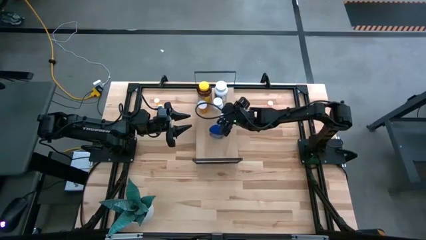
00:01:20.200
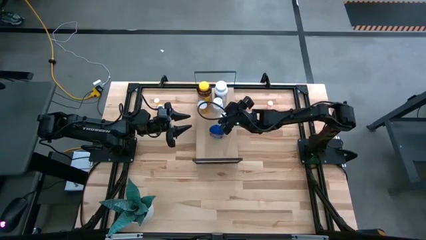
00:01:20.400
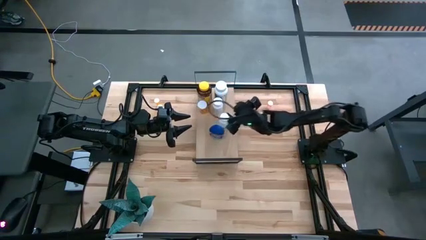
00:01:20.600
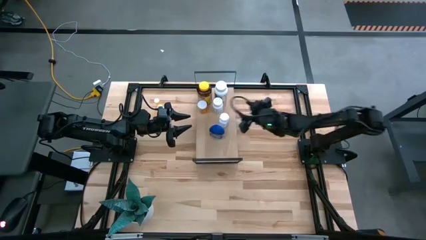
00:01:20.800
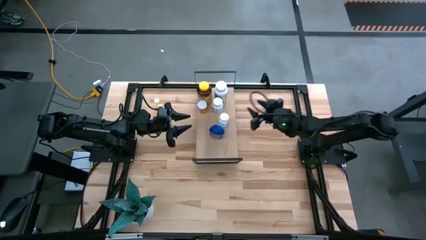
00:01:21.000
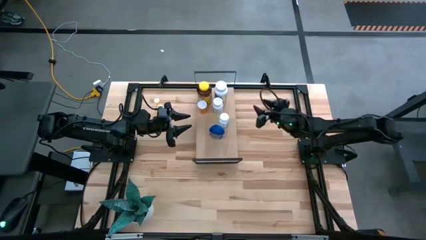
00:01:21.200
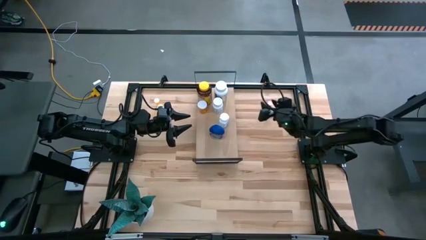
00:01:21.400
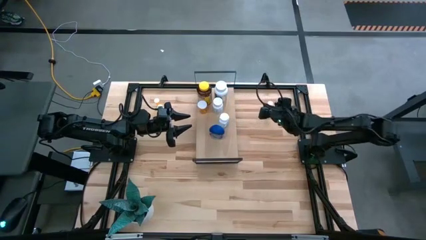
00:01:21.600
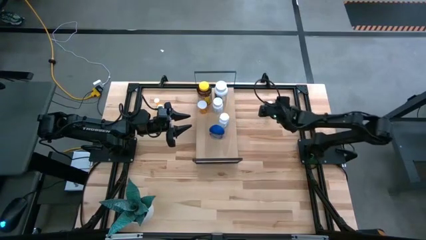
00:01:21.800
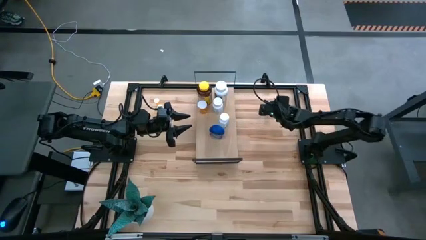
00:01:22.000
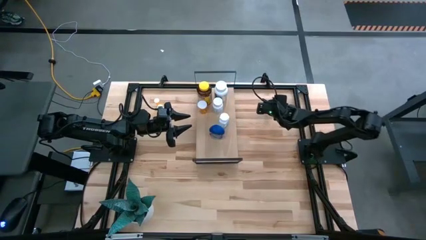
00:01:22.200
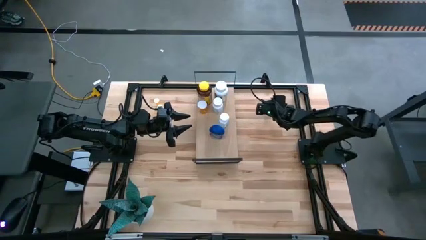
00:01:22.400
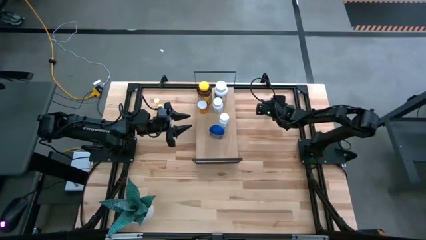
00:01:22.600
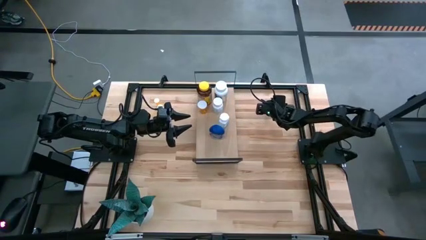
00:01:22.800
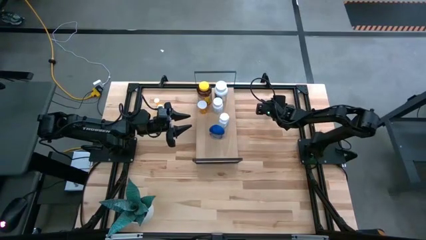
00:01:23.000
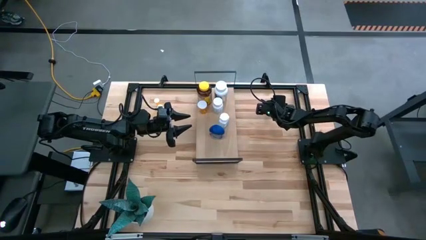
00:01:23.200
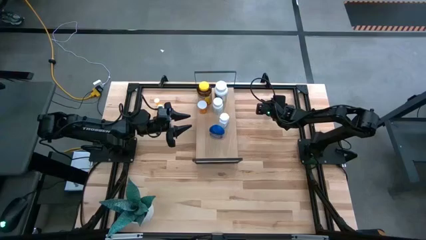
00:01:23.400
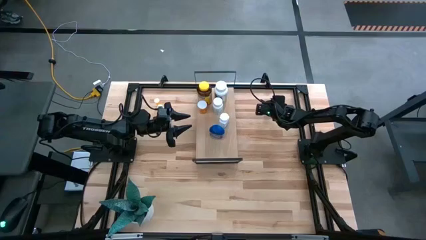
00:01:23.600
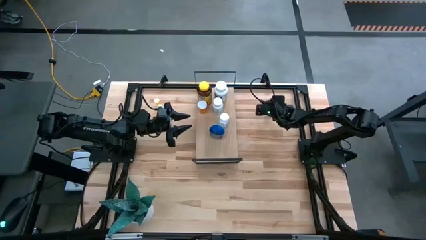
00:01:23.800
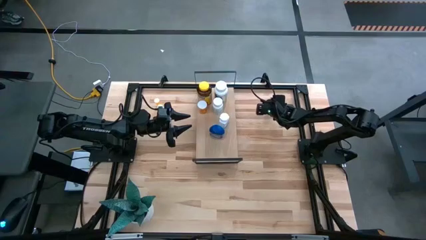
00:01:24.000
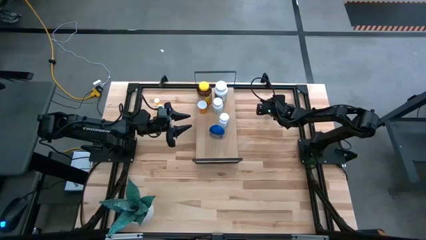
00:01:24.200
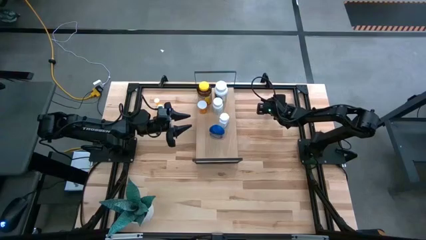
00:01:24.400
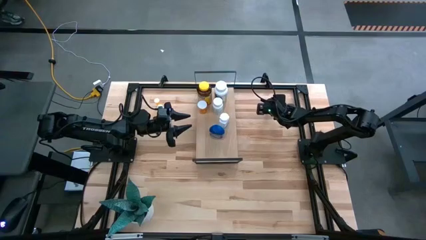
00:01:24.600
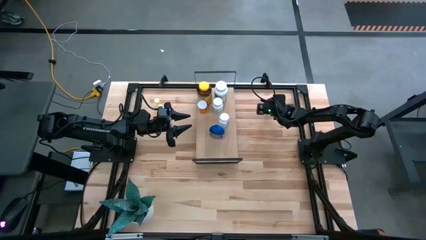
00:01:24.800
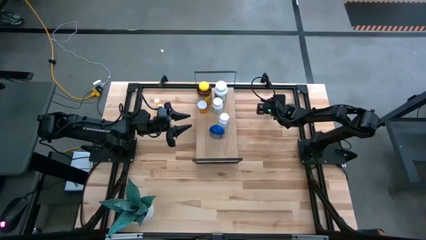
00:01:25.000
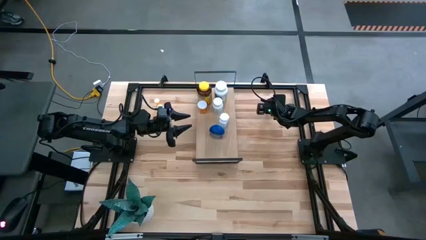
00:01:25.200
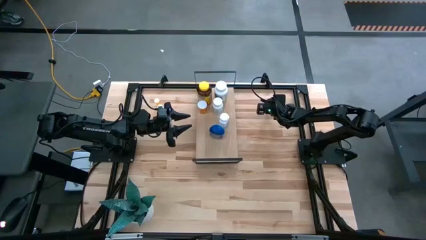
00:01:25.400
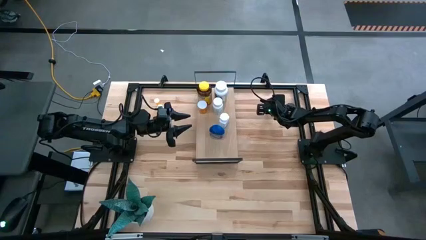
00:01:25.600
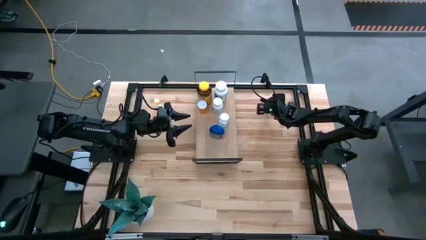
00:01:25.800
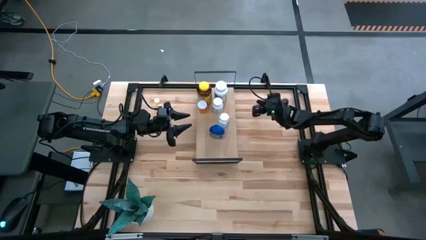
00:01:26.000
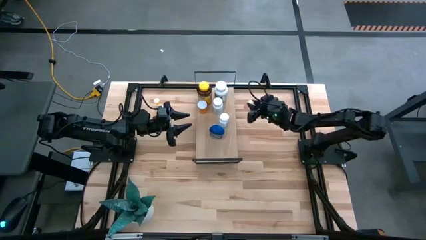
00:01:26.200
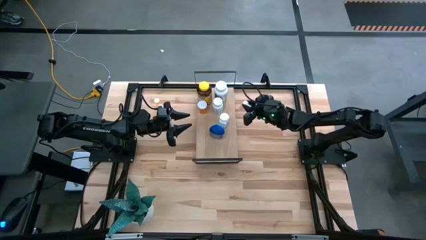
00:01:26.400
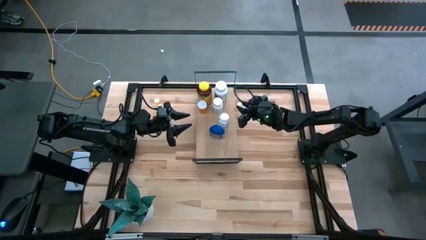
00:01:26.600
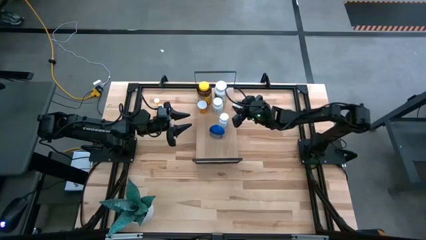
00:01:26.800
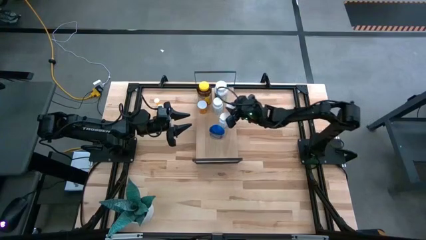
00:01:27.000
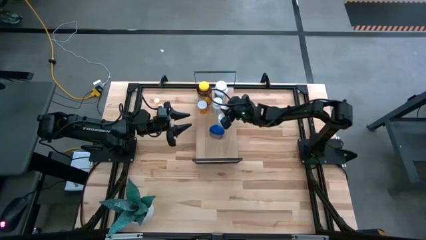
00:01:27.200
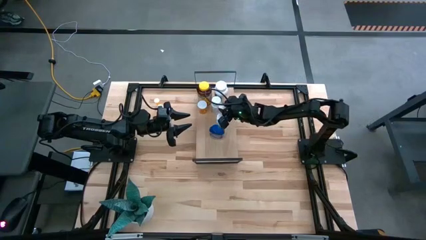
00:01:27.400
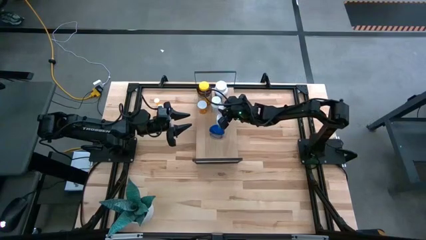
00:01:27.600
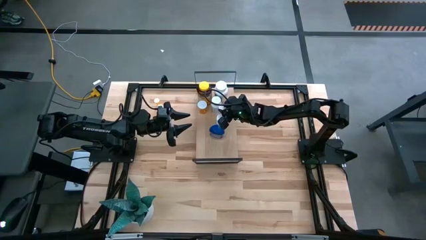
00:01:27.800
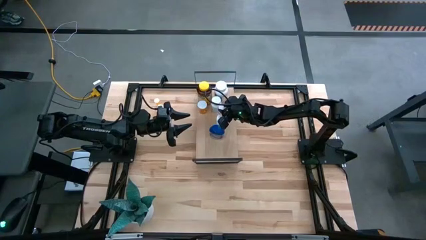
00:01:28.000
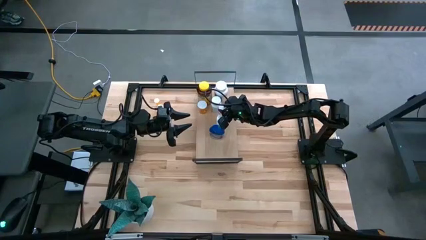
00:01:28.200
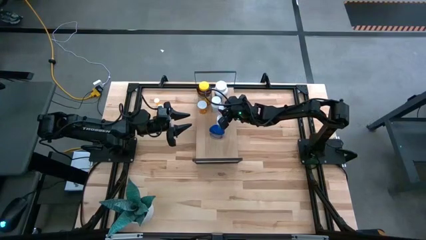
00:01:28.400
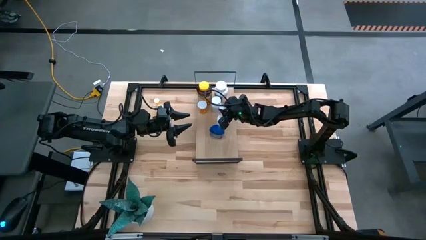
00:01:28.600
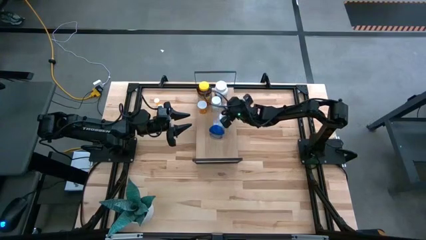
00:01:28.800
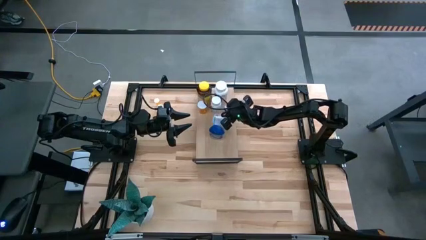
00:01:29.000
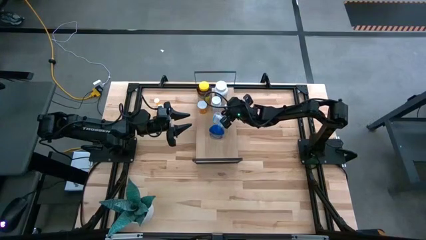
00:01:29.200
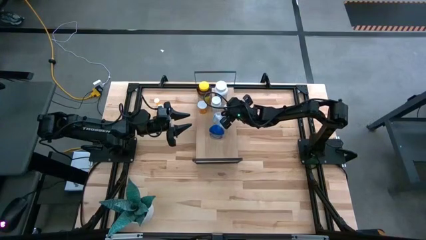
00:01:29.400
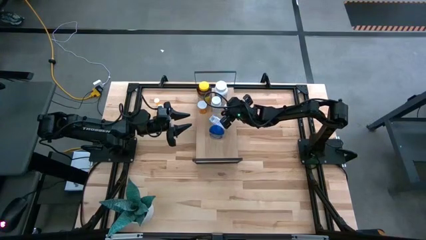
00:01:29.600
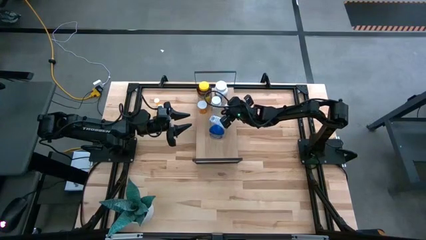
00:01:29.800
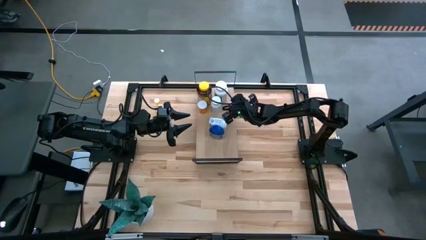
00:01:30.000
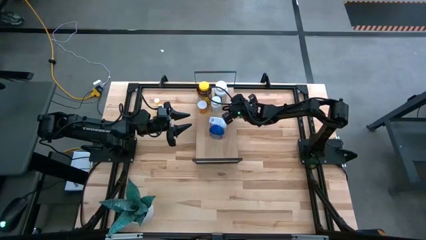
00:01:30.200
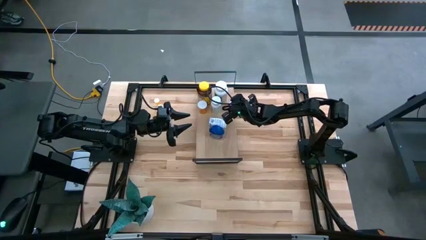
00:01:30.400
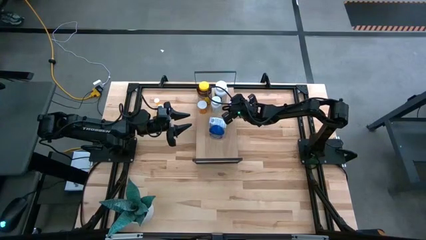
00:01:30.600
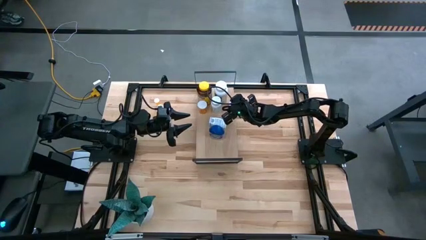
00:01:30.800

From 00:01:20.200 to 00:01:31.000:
Task: Pick and place medicine bottles onto shelf by color
Put the pink medicine bottle on the shelf

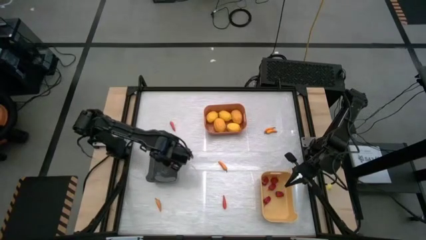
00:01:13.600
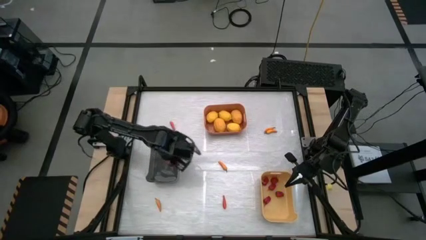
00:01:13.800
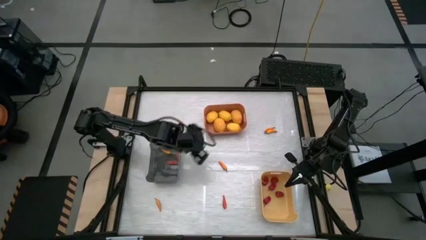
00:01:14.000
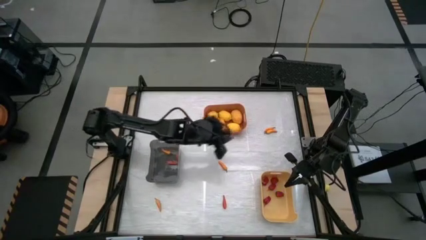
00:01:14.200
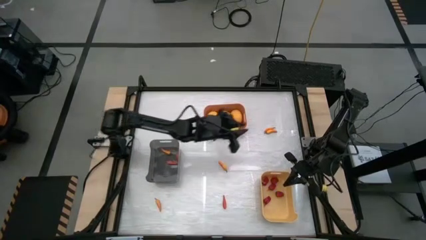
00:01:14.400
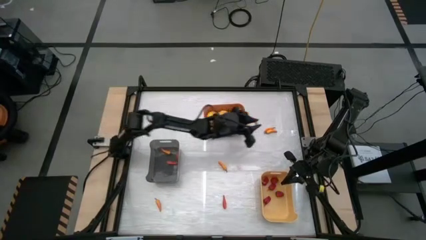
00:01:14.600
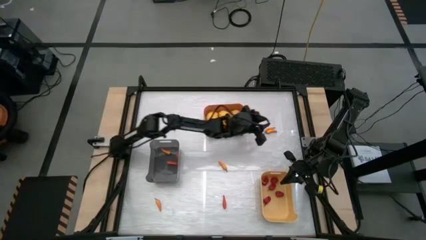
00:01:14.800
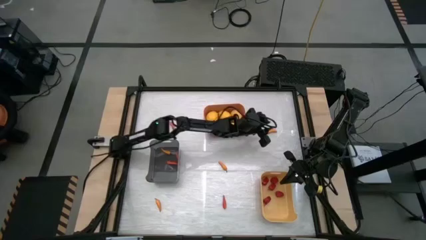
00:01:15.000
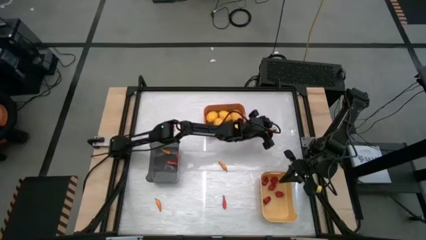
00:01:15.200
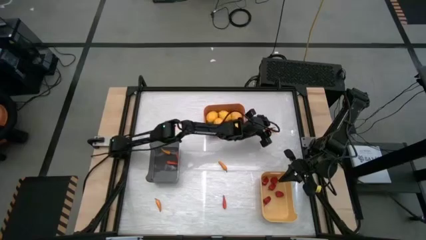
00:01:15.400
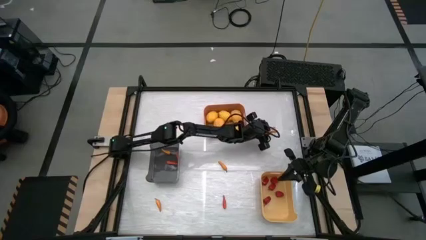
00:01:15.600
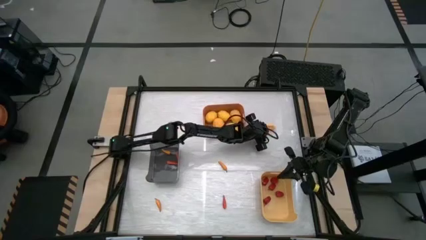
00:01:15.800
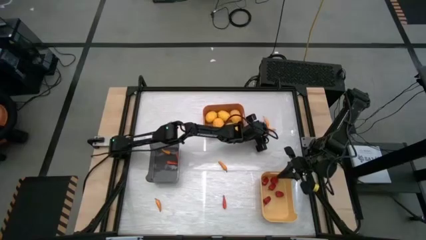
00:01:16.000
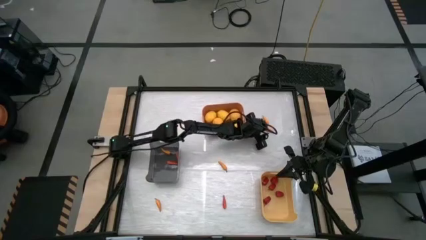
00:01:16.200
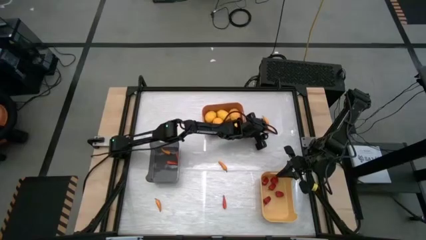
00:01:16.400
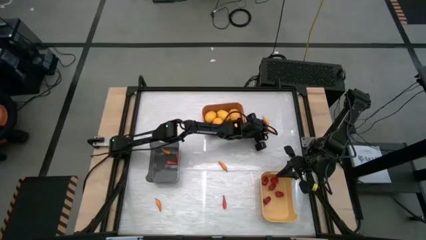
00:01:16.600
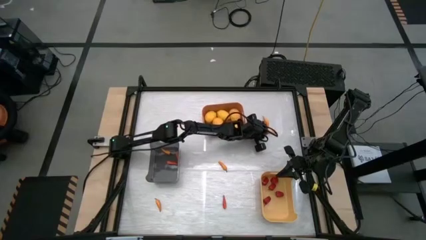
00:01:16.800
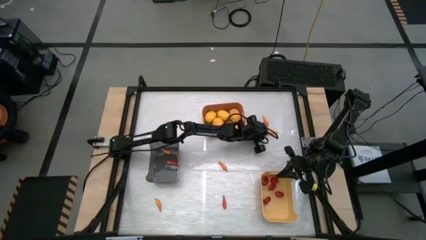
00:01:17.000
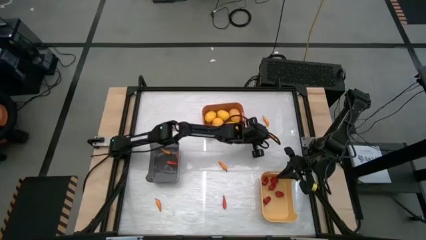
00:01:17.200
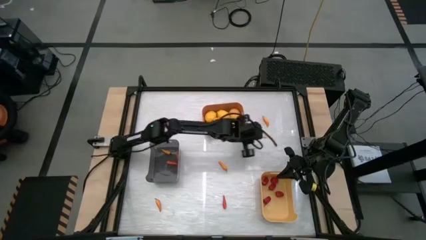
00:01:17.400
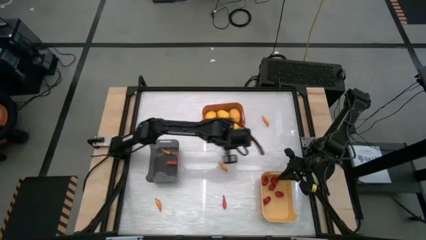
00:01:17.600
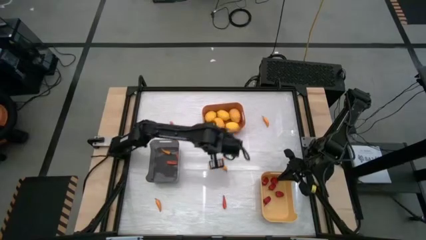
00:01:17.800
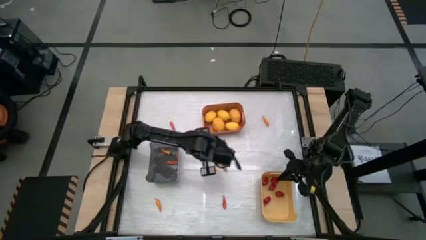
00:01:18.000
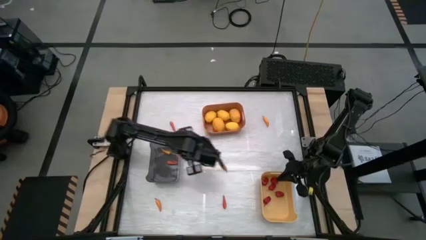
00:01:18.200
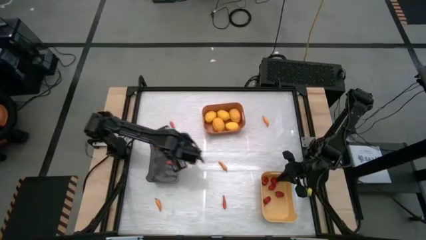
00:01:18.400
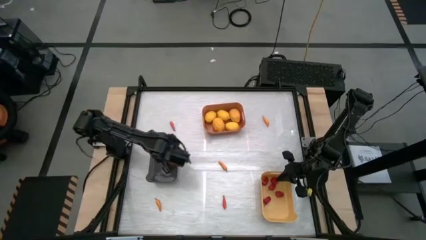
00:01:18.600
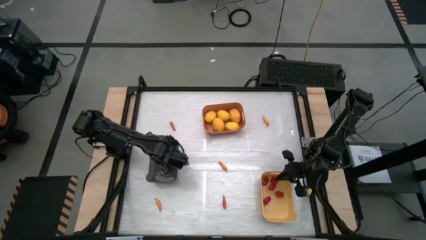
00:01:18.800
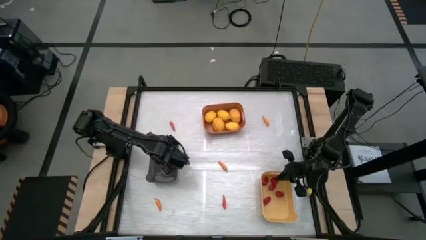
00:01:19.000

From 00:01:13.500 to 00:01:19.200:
Task: Sort produce into baskets
Put the yellow chili pepper into the black bin
